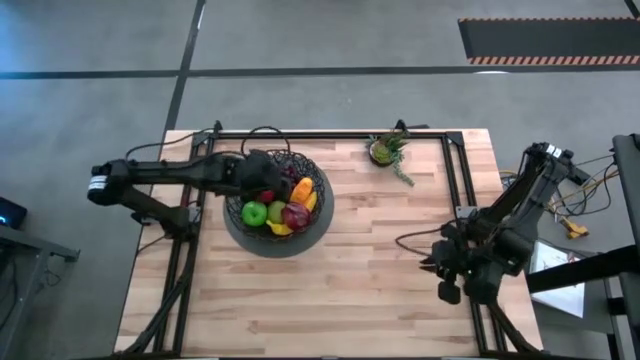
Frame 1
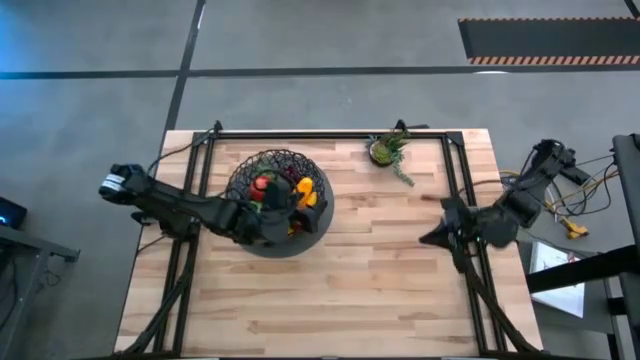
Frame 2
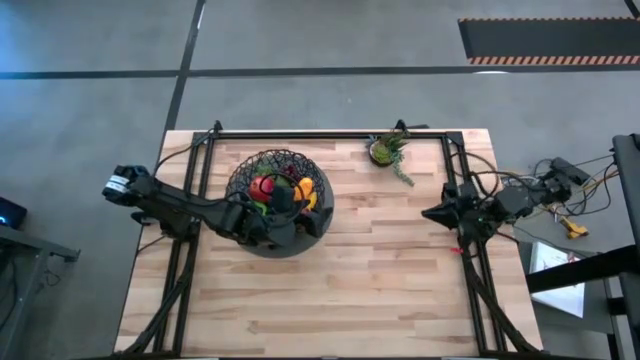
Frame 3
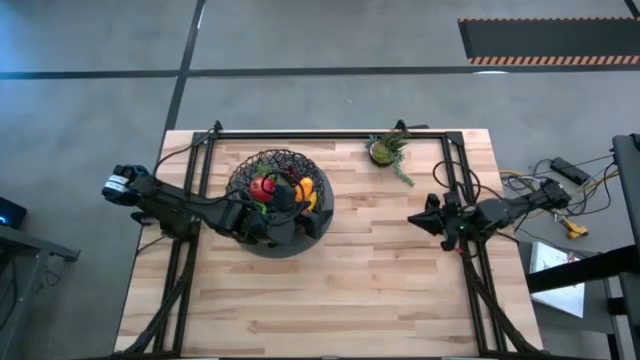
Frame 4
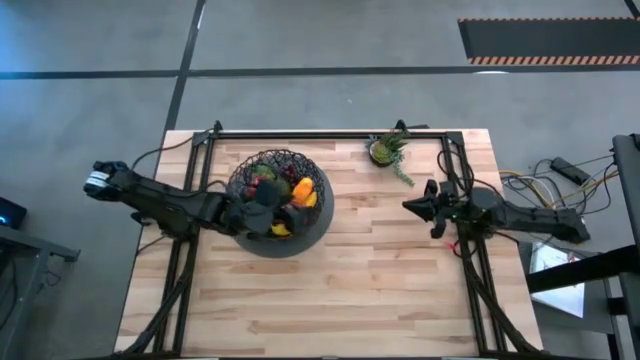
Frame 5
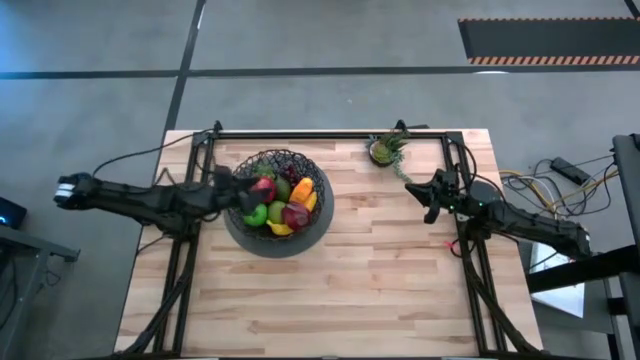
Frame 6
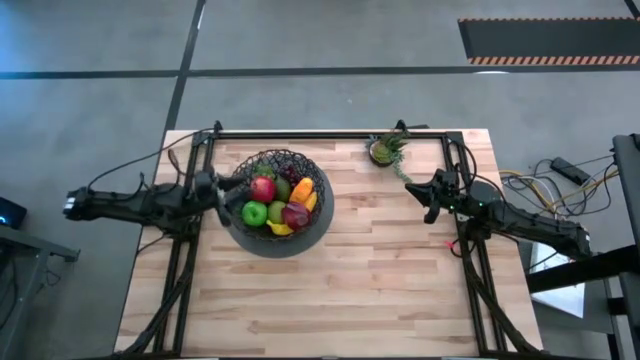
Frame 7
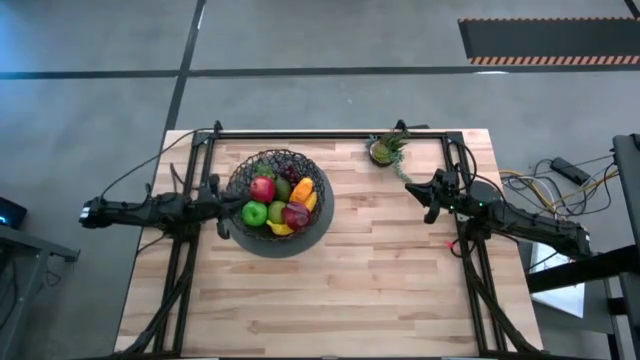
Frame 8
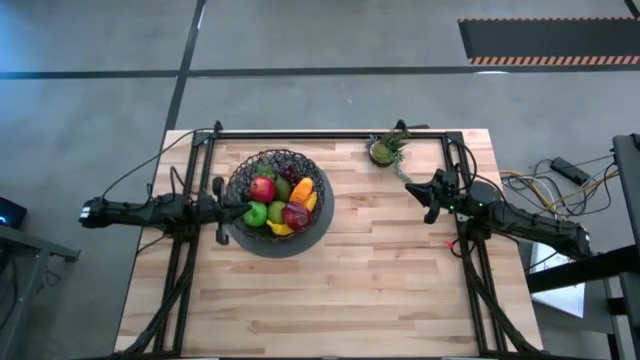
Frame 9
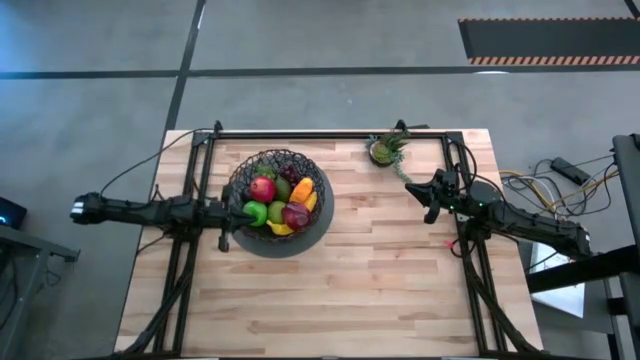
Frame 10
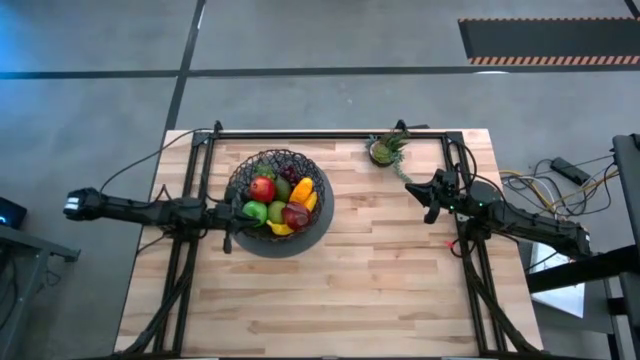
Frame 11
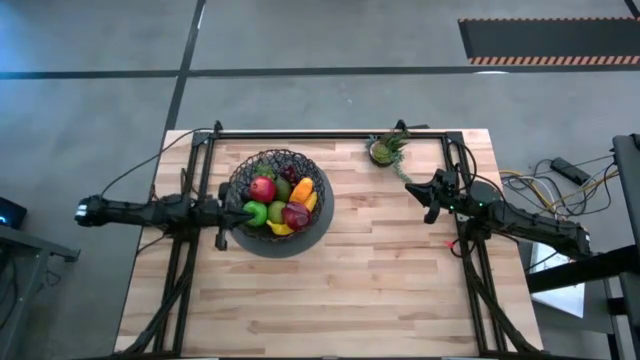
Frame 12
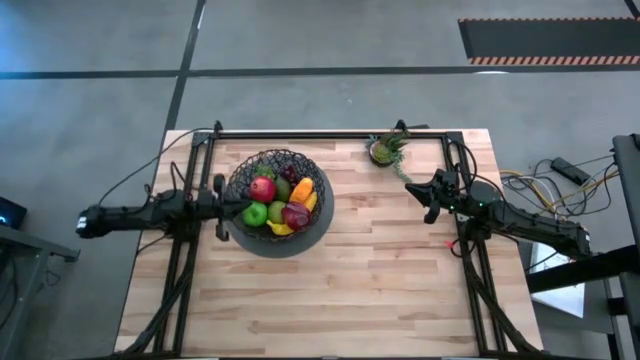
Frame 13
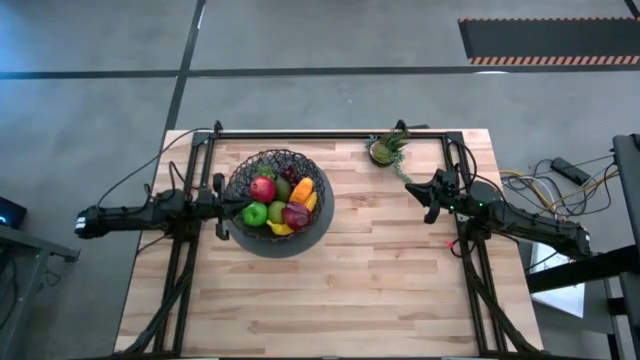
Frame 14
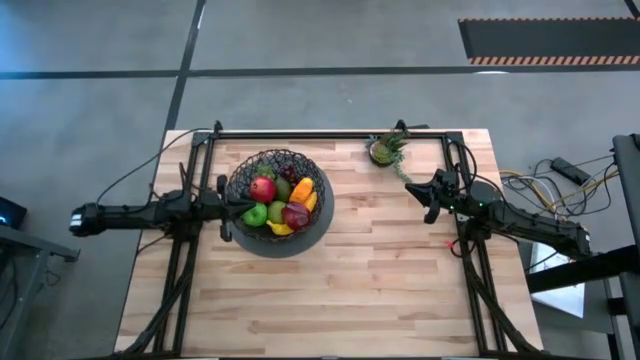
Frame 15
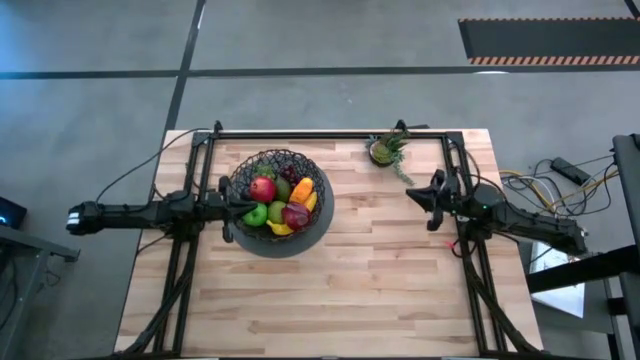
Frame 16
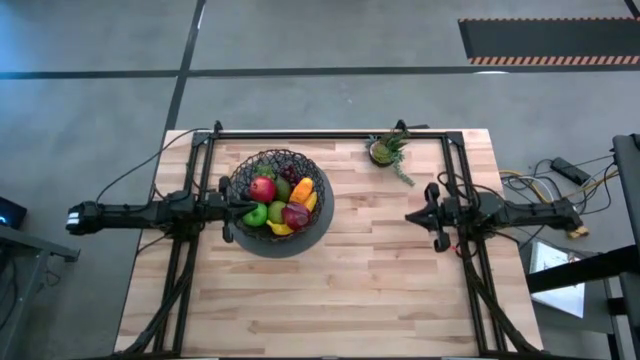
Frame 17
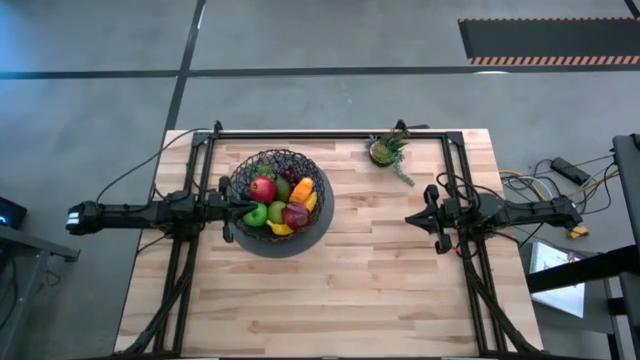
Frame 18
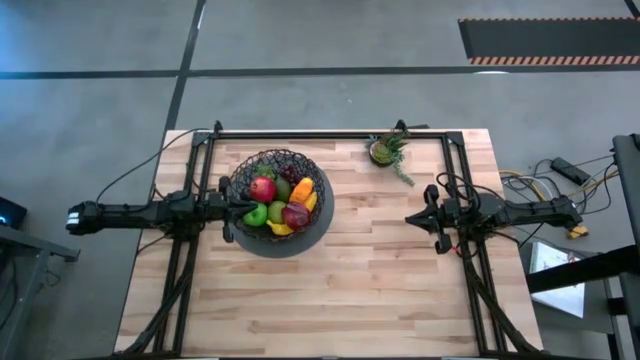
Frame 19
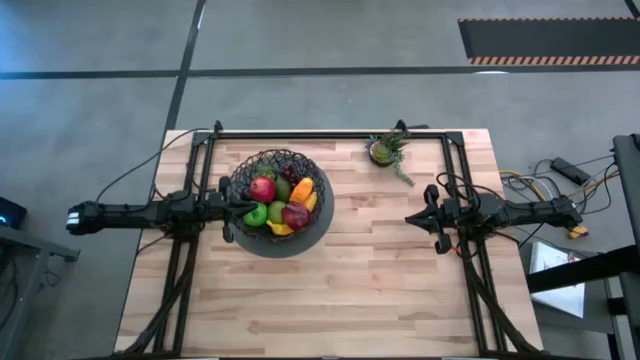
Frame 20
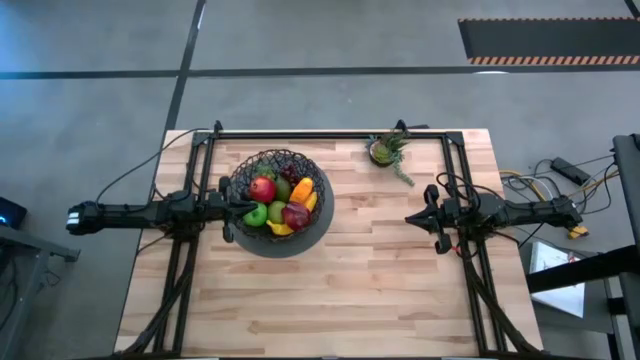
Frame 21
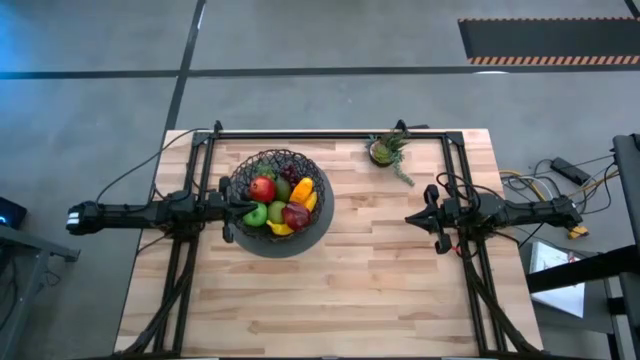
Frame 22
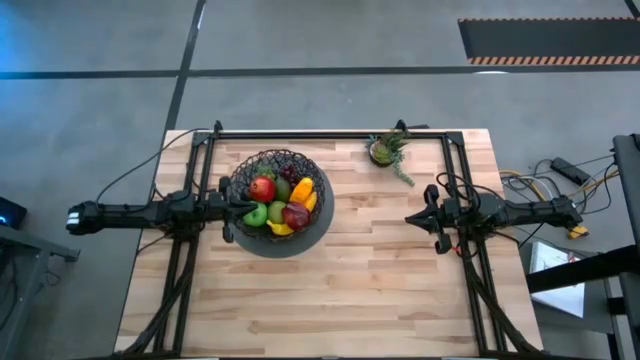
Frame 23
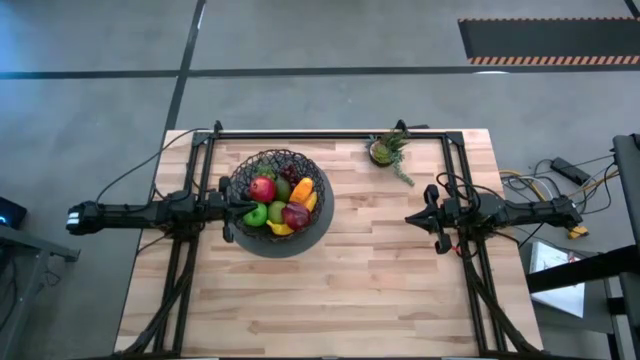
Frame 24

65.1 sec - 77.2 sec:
Task: Build produce basket
Return to Home Position

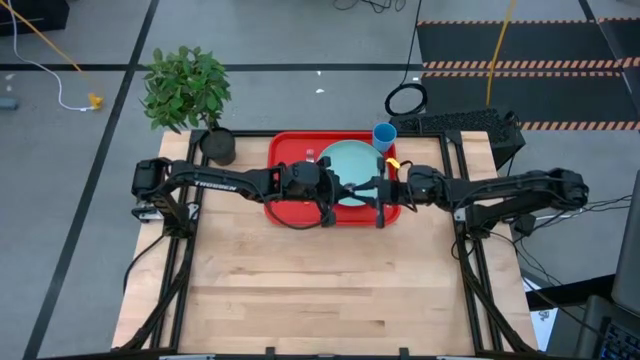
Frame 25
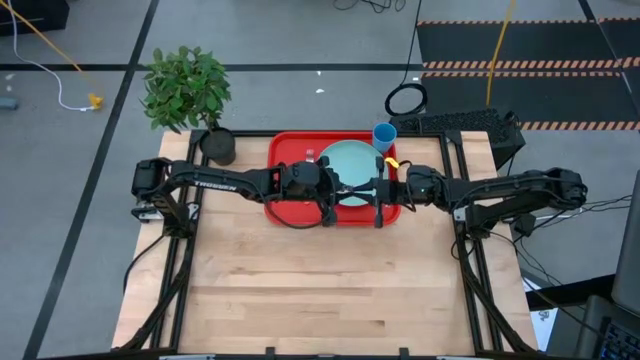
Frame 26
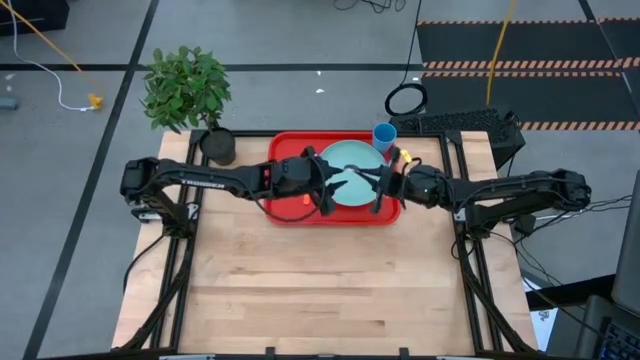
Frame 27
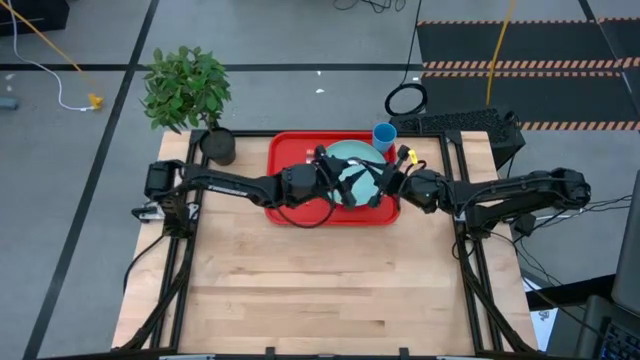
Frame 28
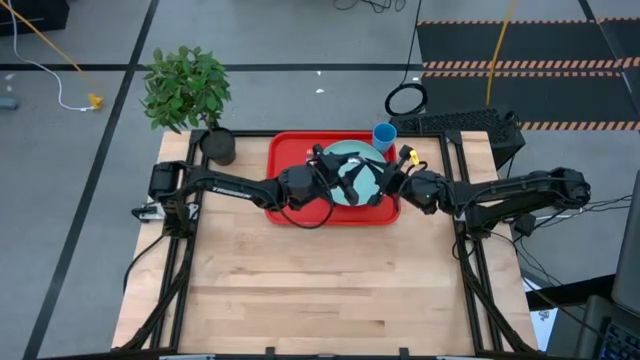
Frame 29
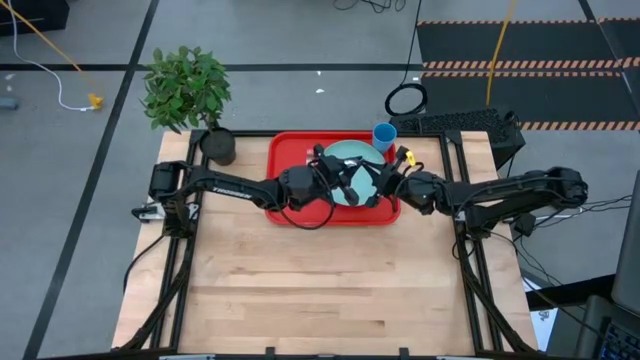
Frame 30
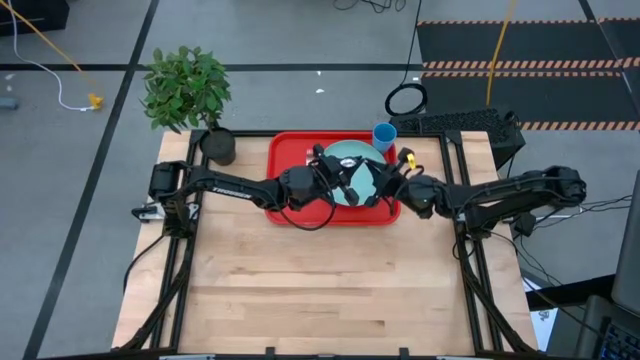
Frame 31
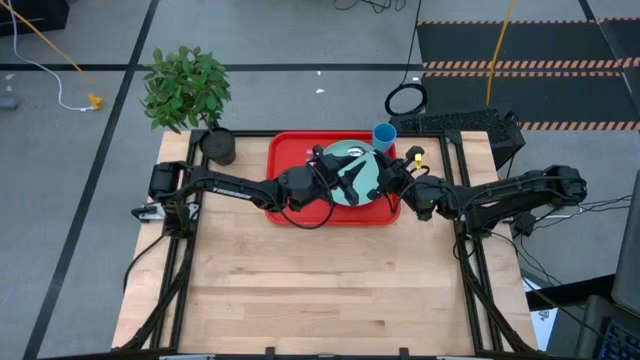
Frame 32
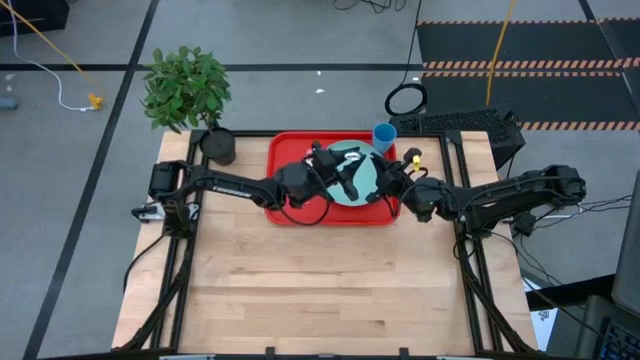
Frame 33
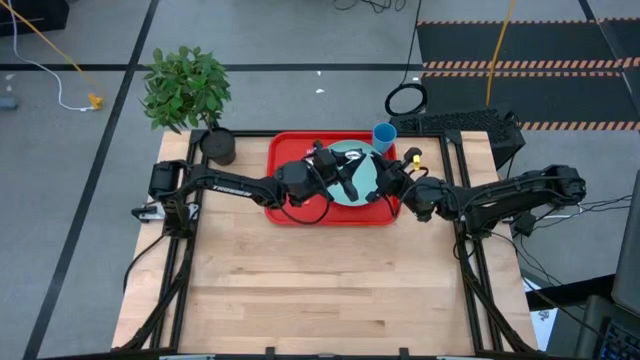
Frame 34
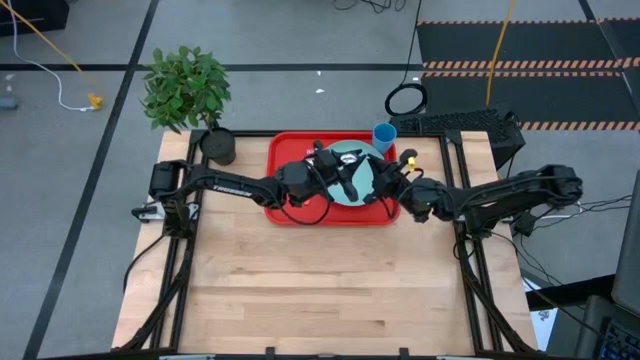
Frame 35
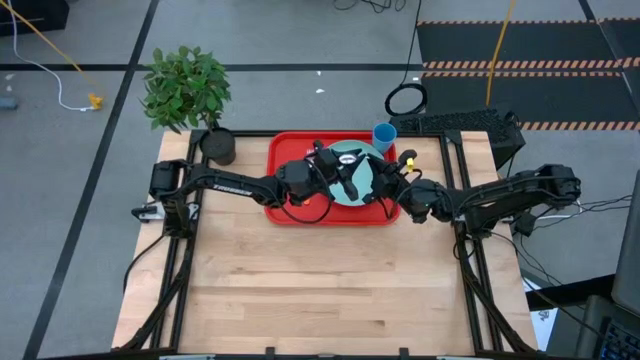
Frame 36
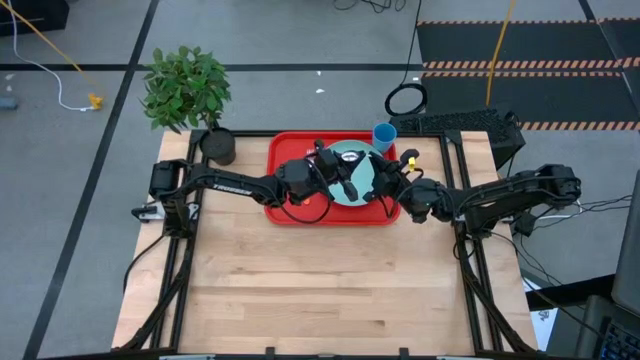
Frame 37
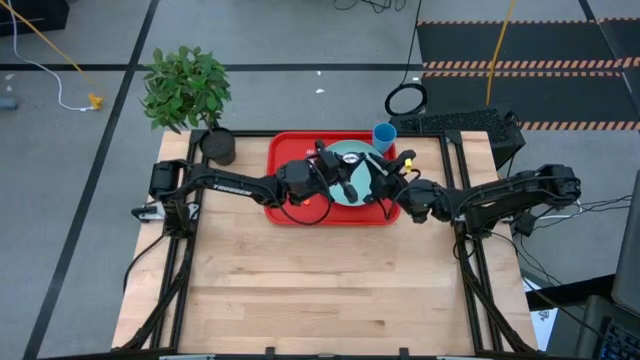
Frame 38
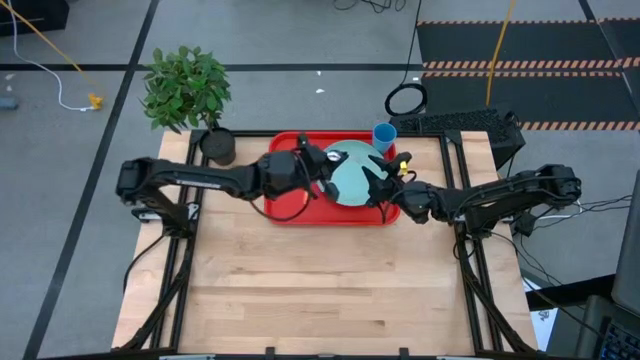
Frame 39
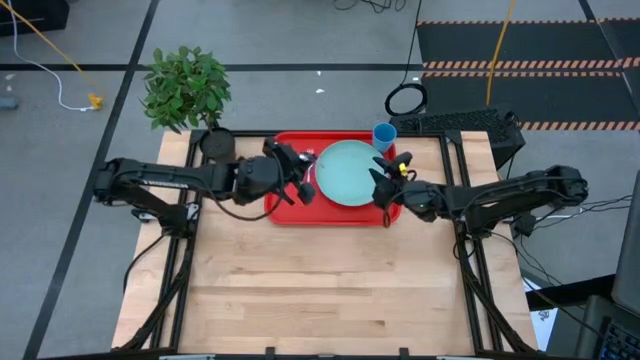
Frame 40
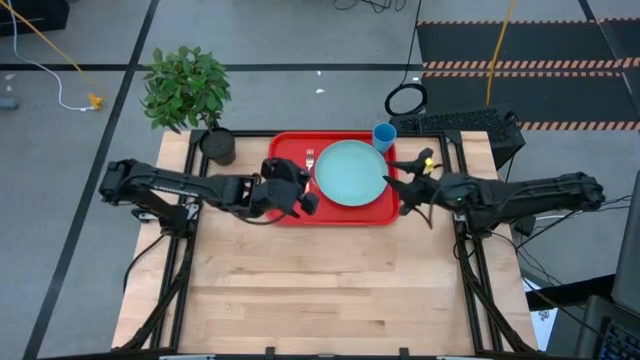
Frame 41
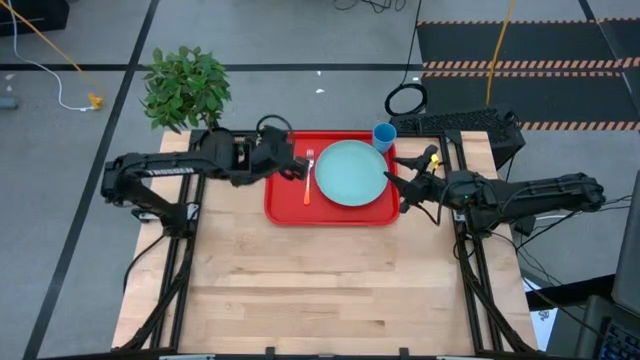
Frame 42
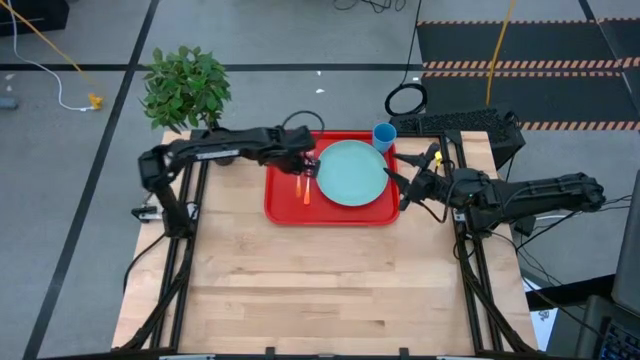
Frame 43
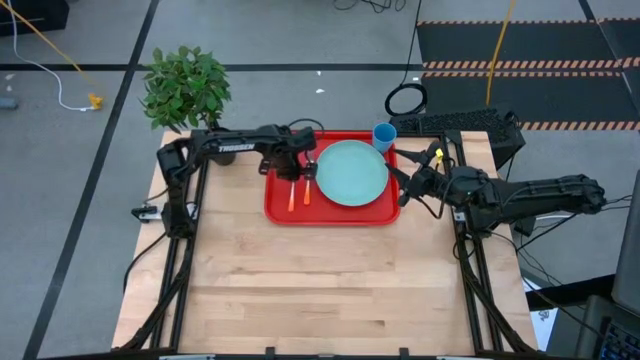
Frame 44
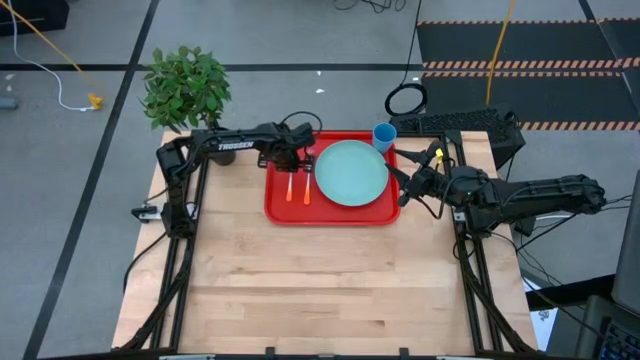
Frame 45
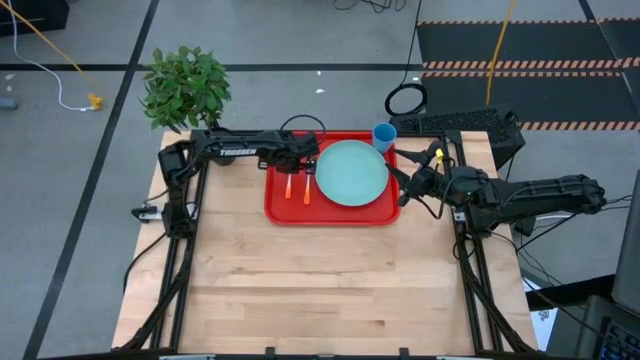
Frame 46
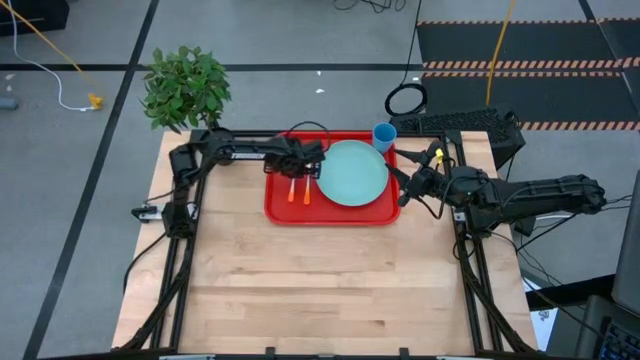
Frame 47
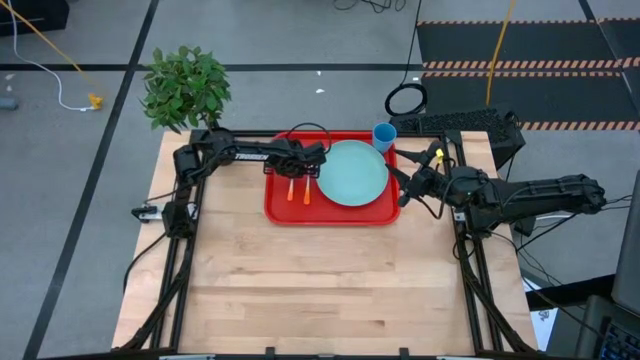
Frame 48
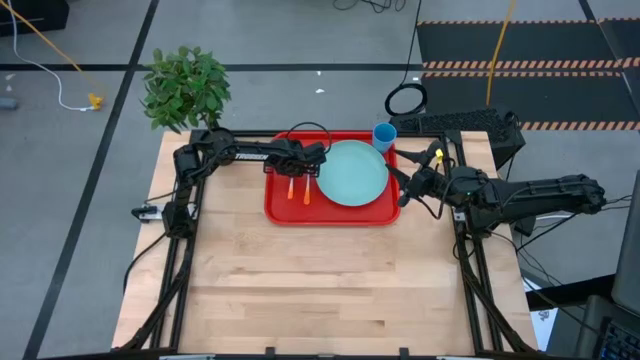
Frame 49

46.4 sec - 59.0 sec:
Task: Pick and place plate/cup/fork/spoon on tray
Put the orange spoon on the orange serving tray to the left of the orange fork
